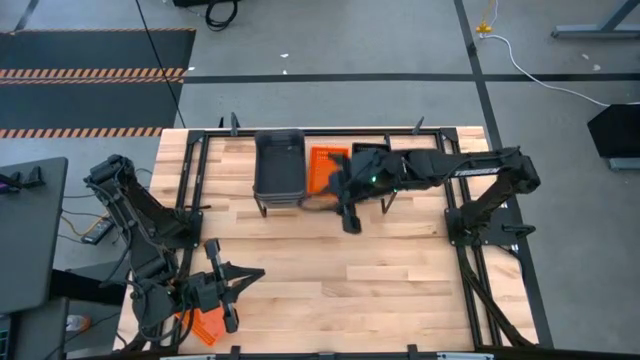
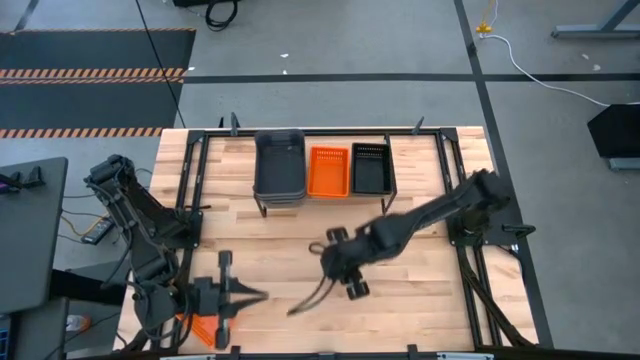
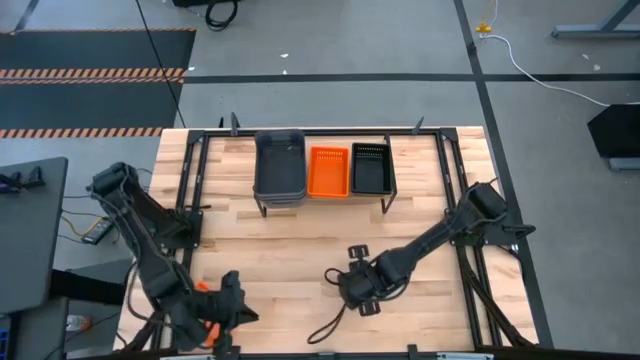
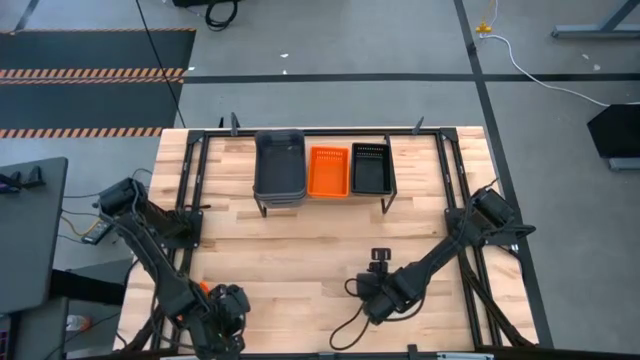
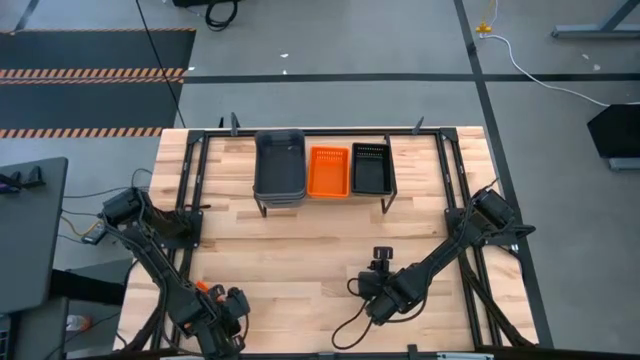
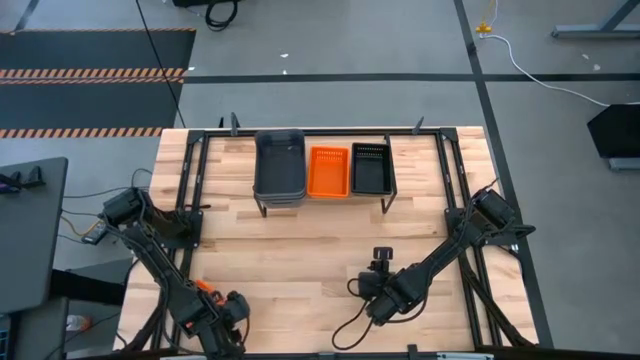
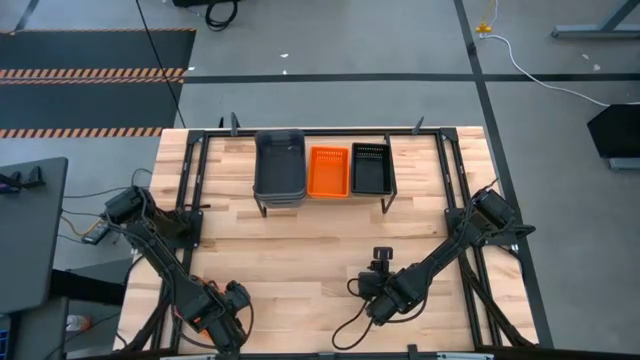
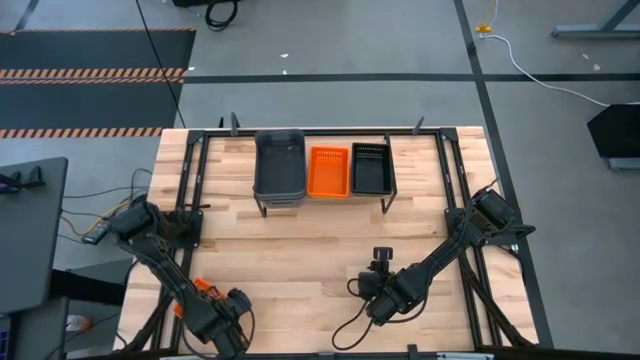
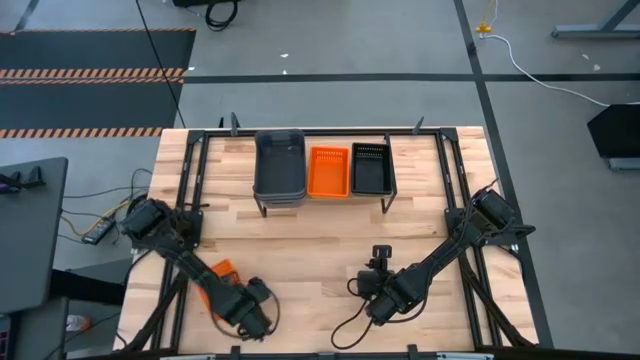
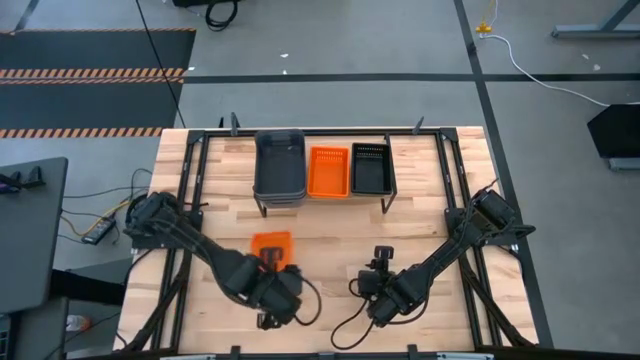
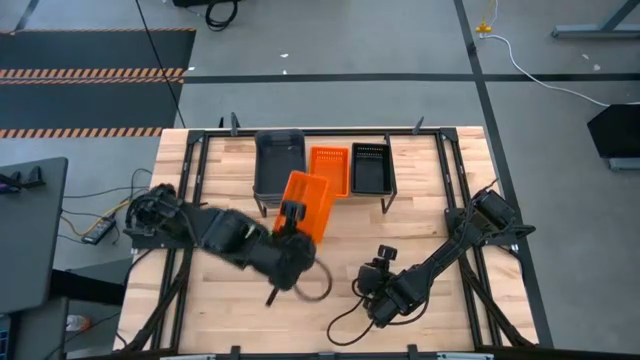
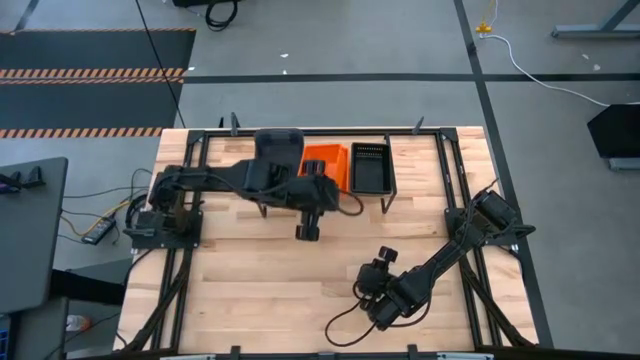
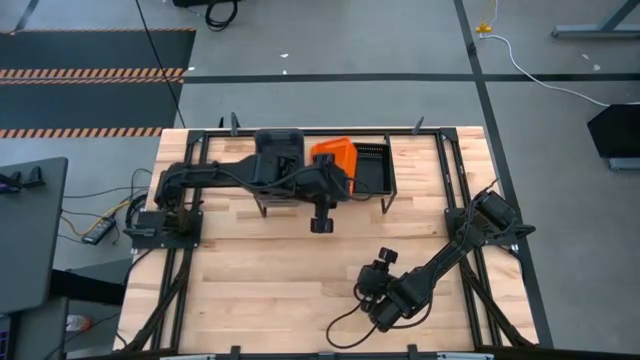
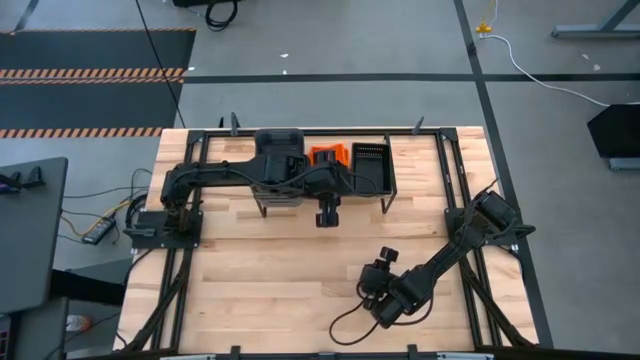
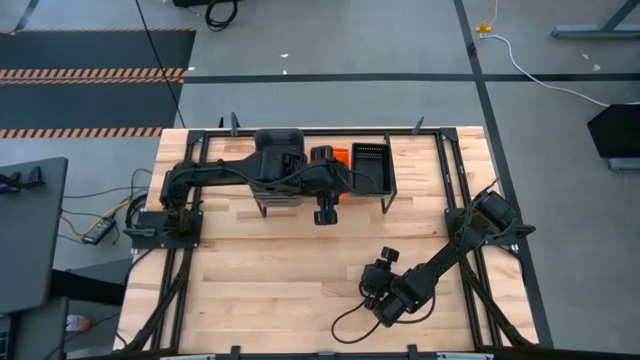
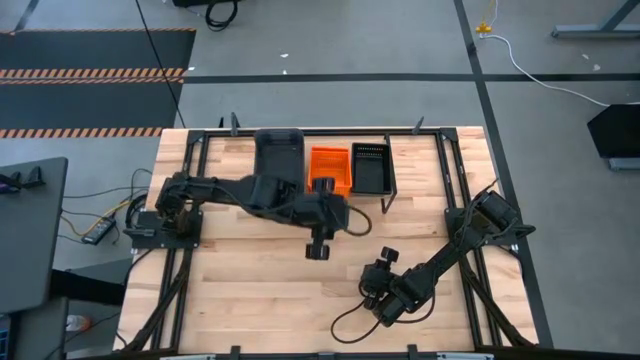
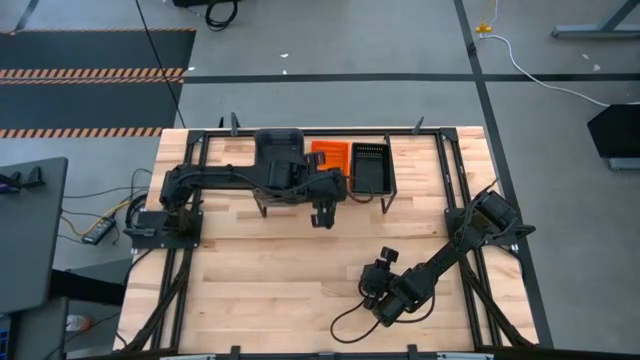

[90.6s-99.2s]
Task: Stack baskets on shelf by color
Stack the orange bin on the orange bin on the shelf

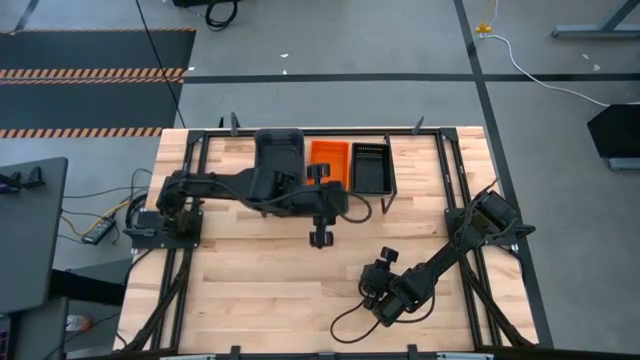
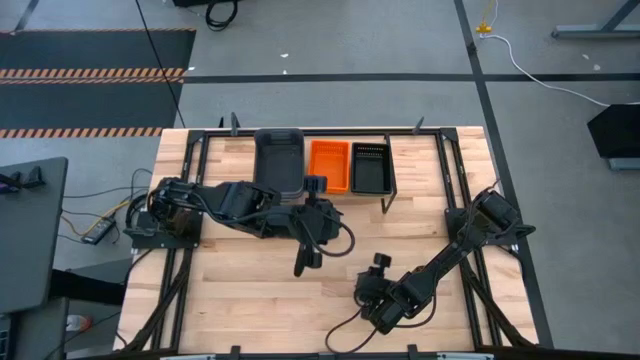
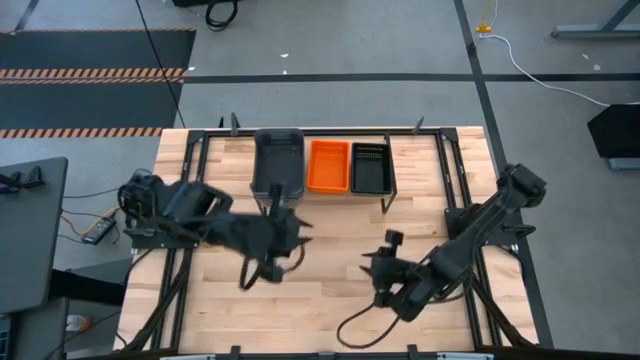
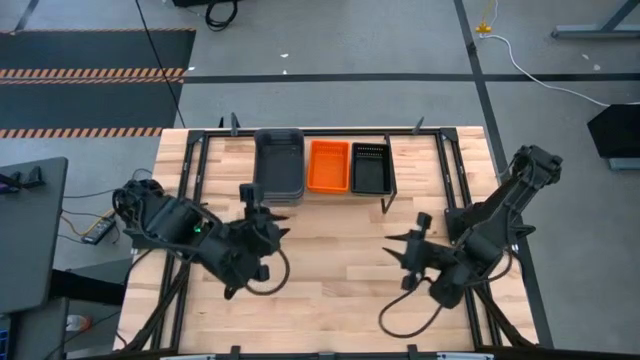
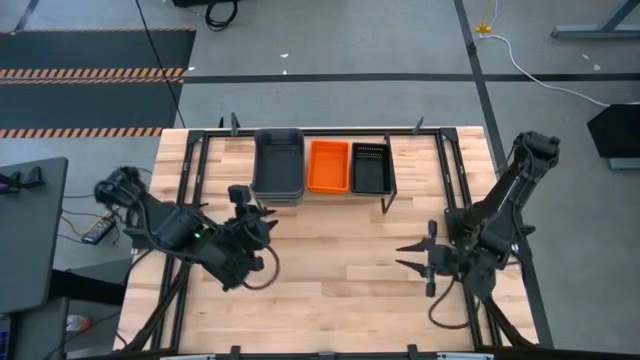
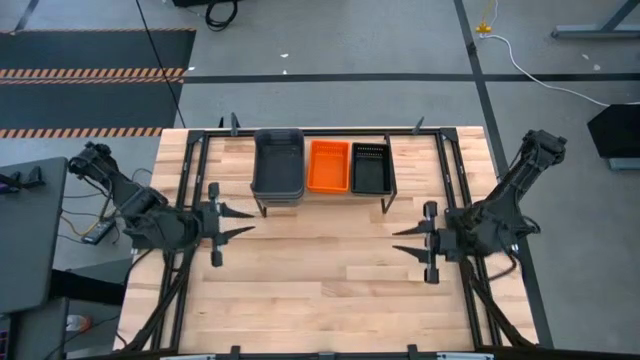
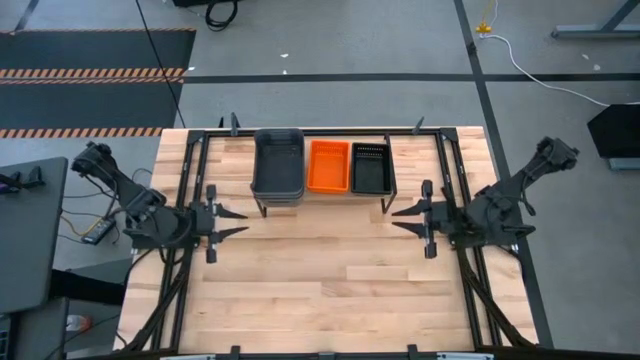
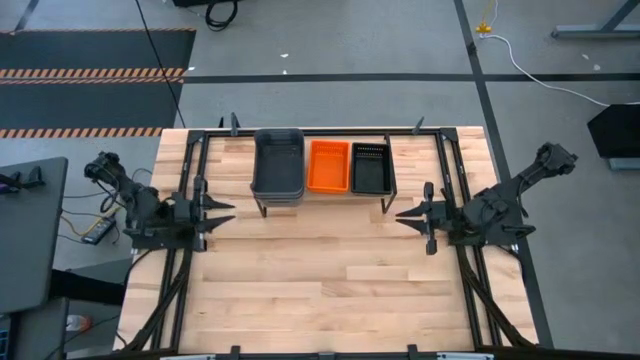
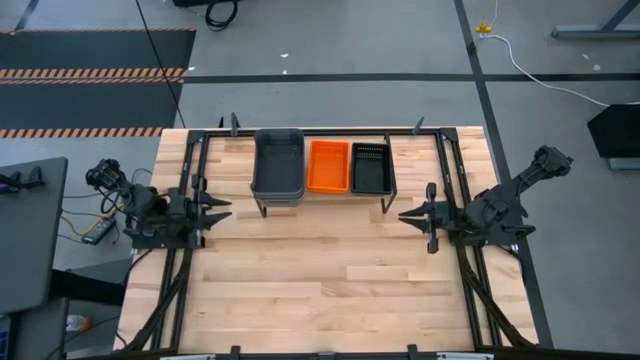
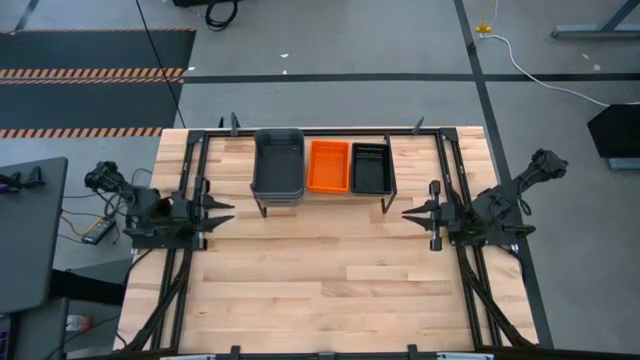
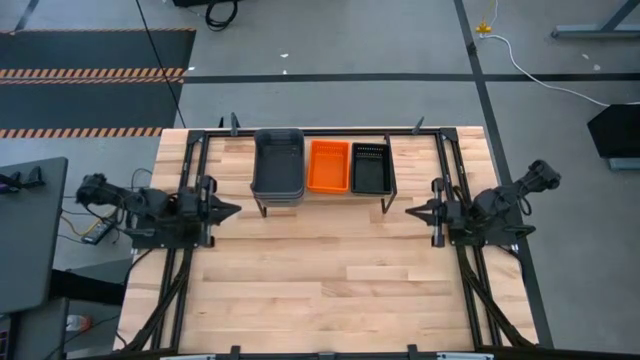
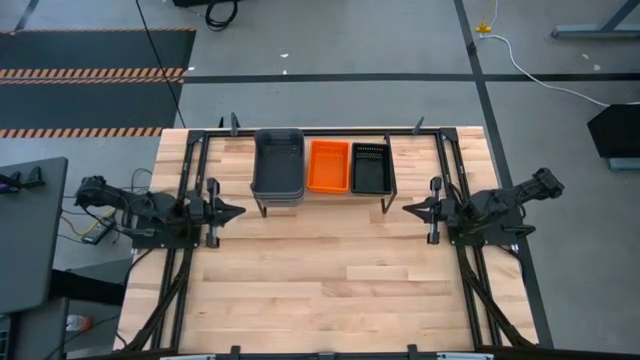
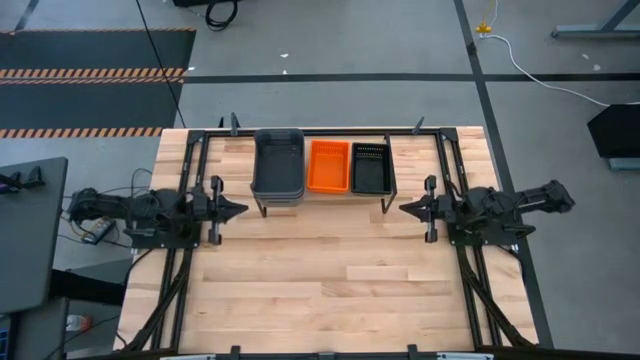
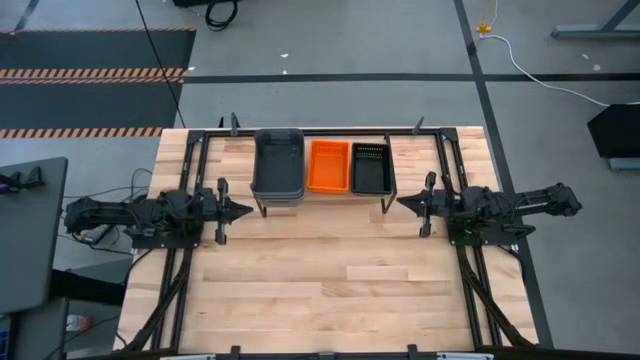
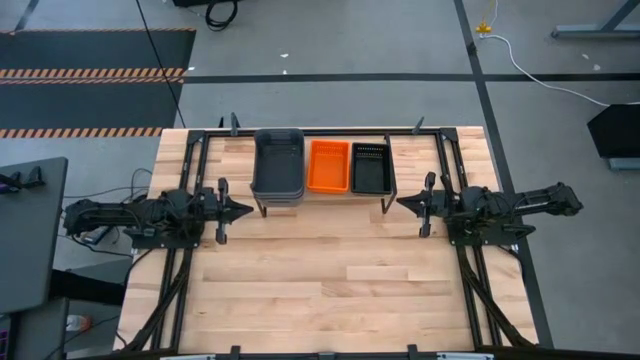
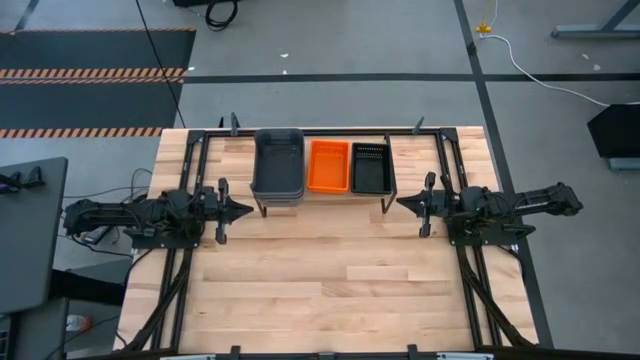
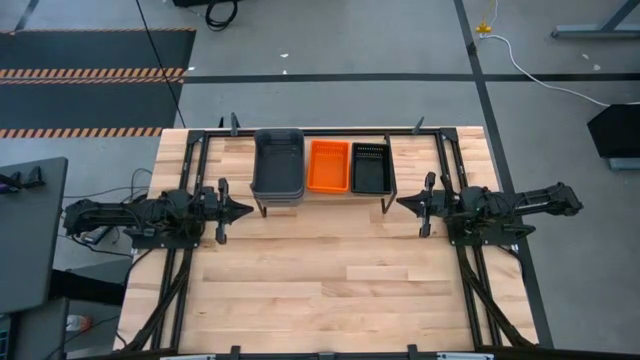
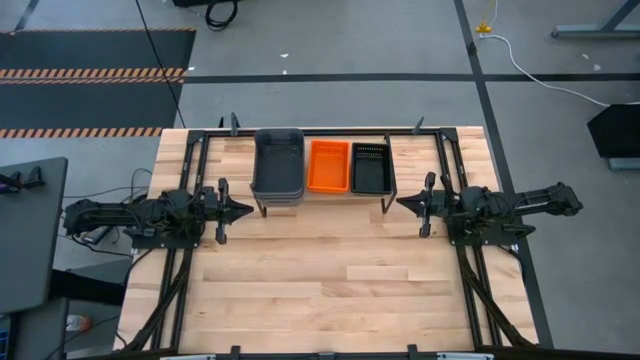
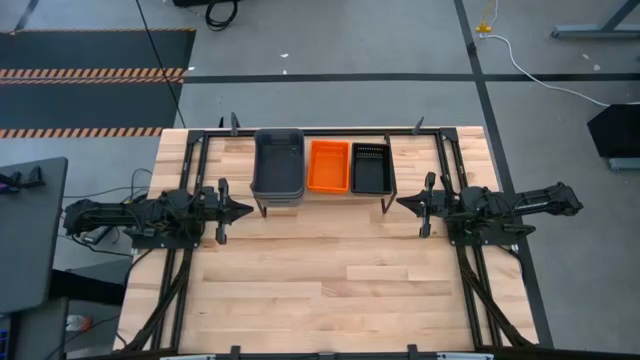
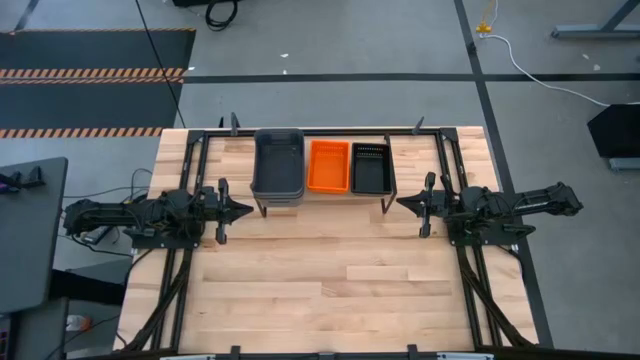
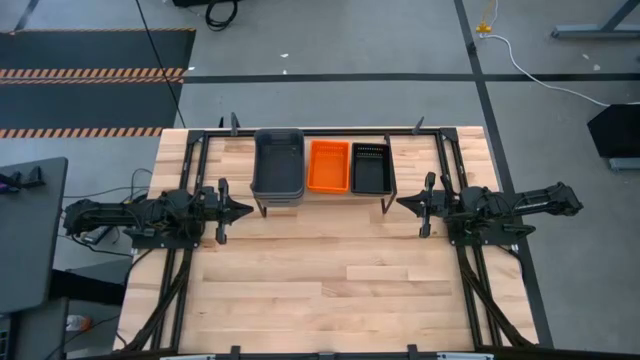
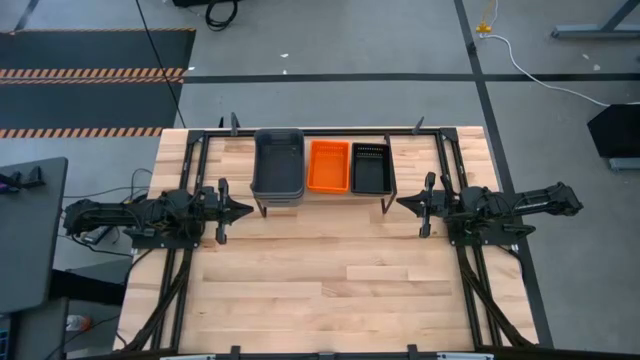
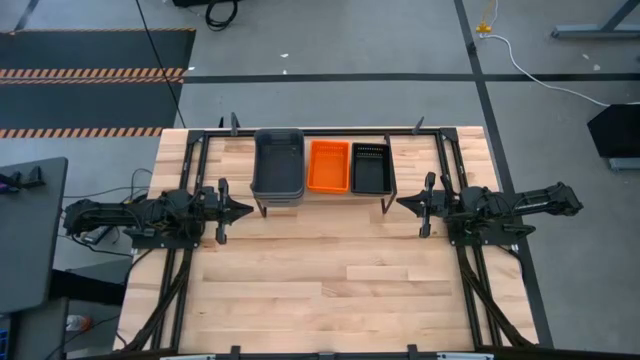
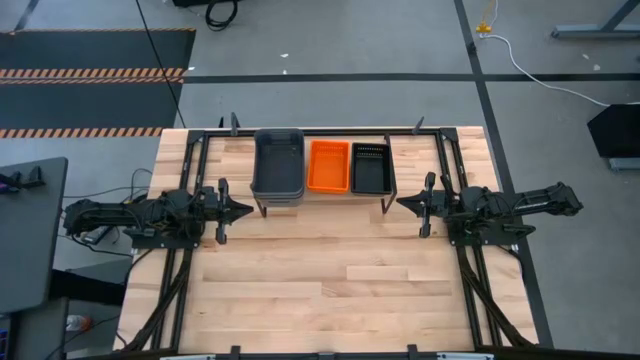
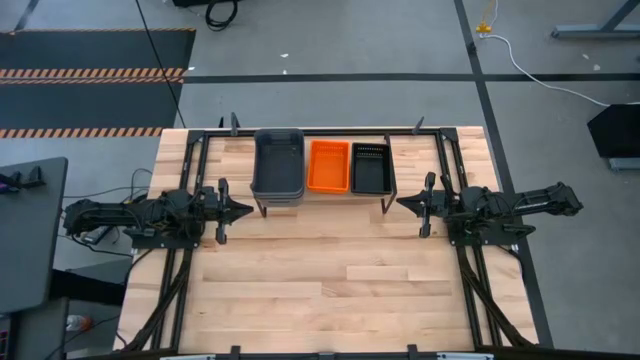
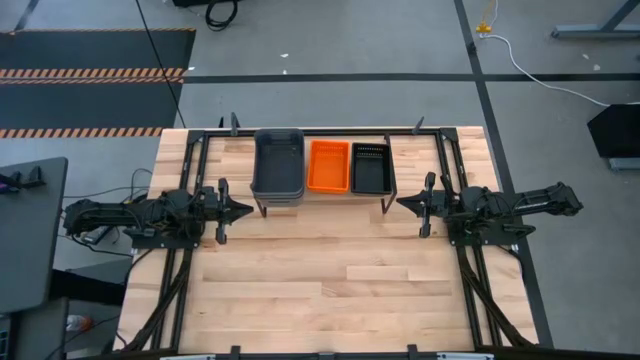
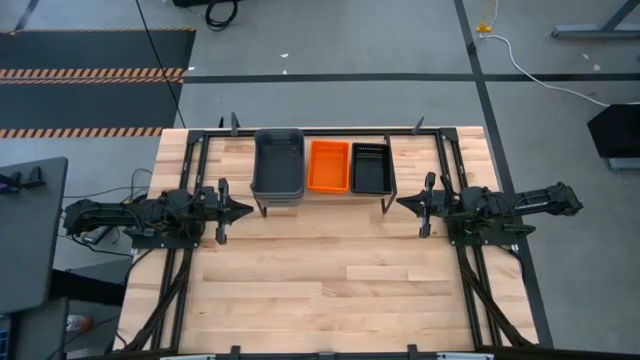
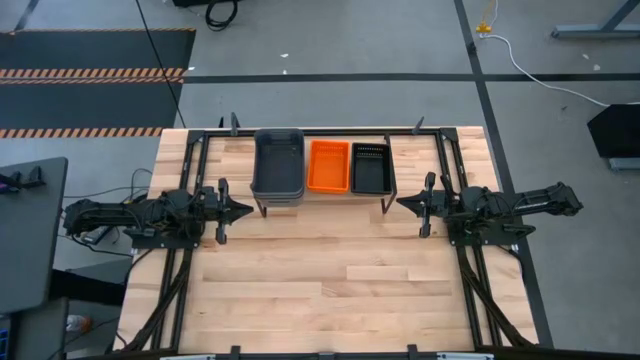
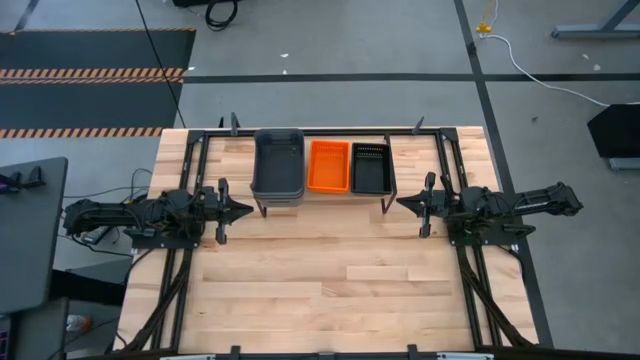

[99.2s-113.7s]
Return to Home Position
